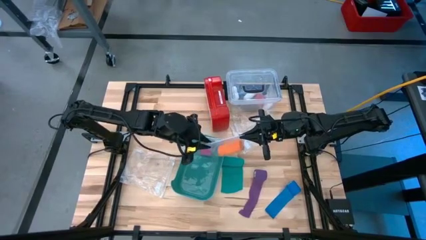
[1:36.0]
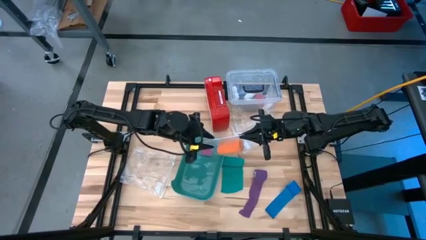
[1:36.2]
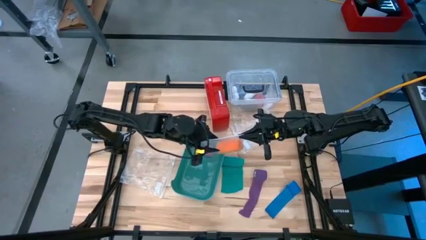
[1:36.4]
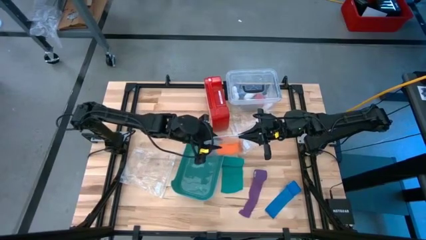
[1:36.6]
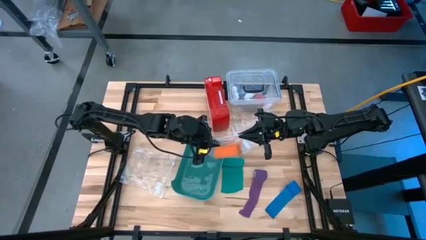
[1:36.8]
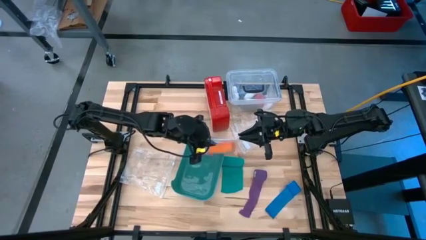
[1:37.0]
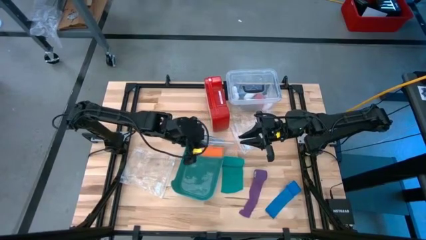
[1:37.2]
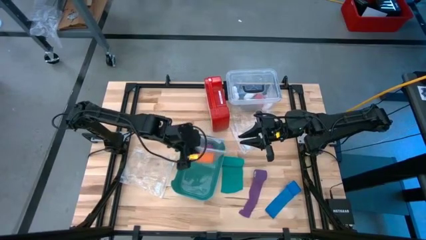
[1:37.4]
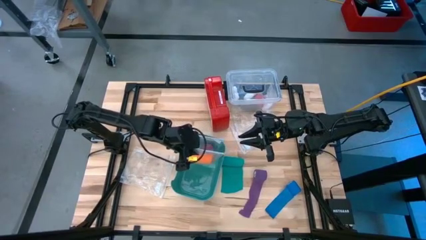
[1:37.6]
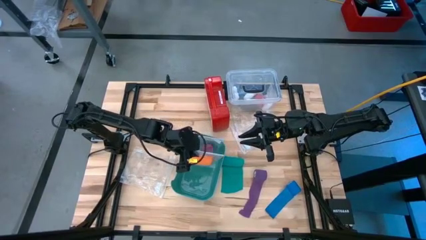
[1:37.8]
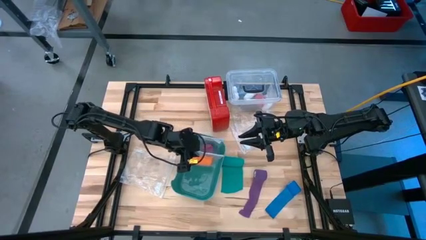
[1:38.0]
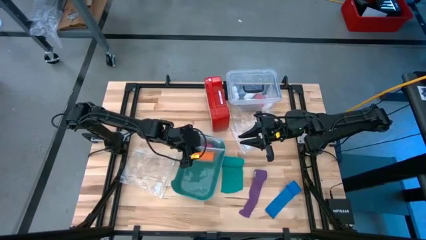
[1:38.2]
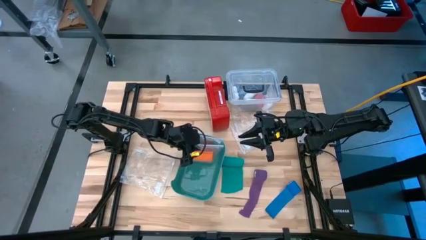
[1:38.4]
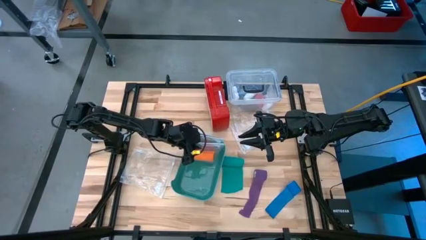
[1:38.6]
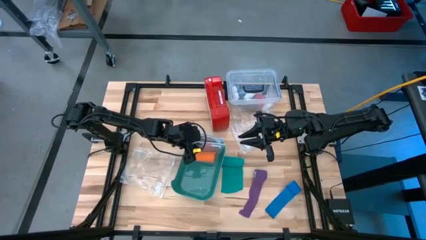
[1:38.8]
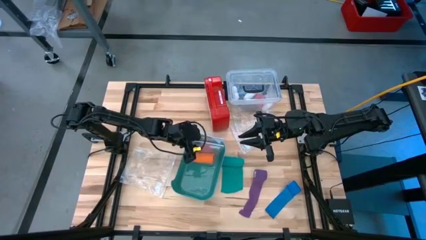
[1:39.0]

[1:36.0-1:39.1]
Task: Roll bandage
Put the transparent zip bag into the green bin

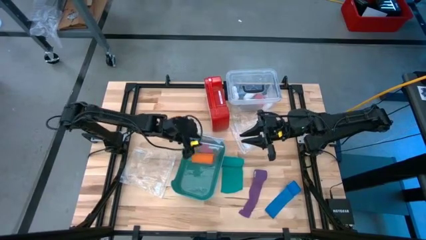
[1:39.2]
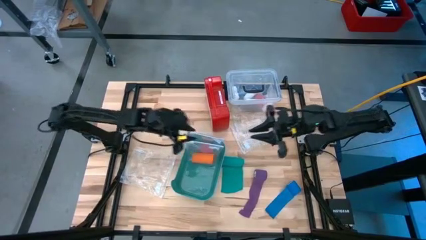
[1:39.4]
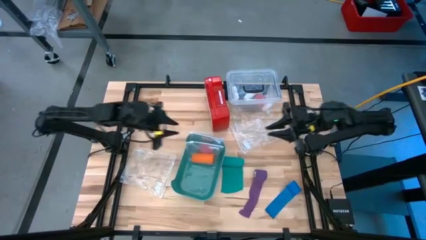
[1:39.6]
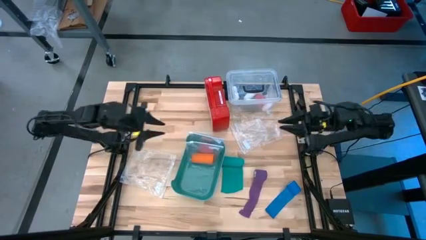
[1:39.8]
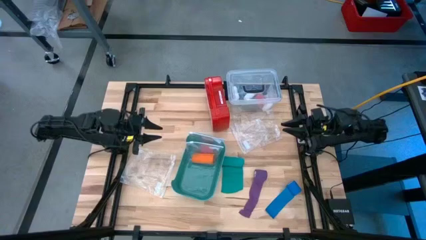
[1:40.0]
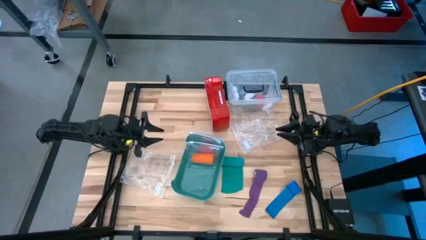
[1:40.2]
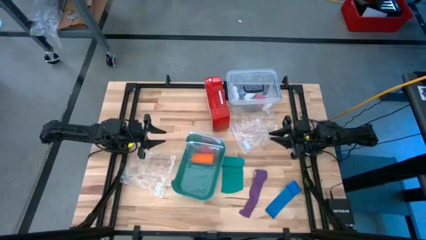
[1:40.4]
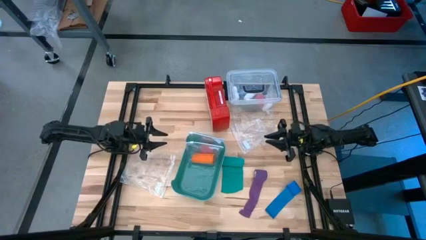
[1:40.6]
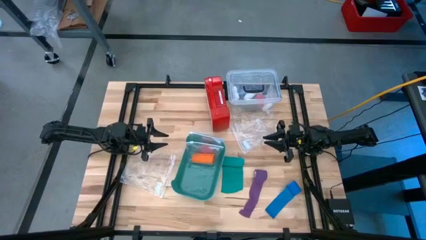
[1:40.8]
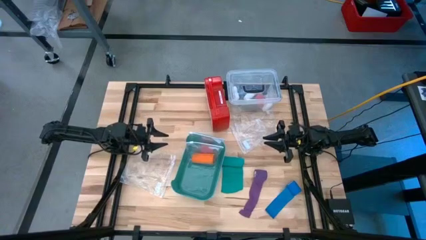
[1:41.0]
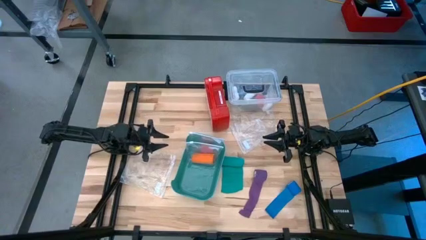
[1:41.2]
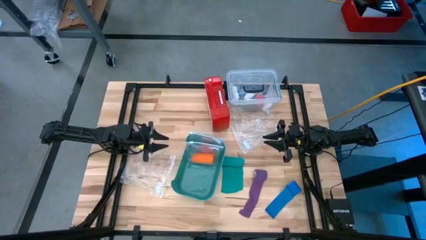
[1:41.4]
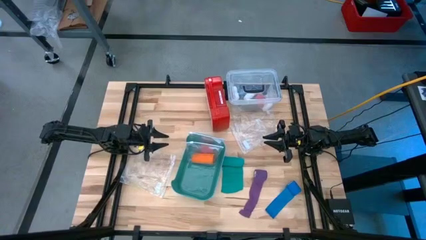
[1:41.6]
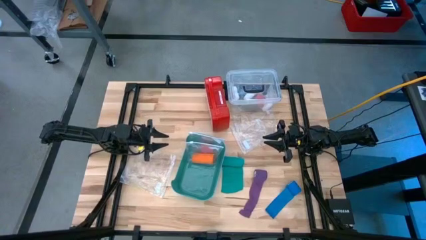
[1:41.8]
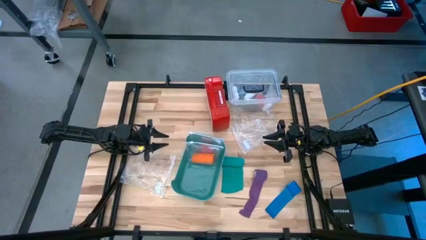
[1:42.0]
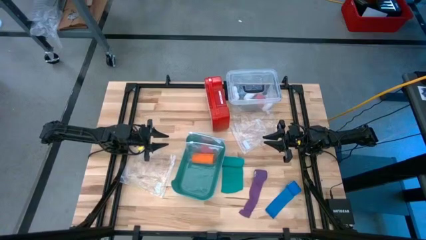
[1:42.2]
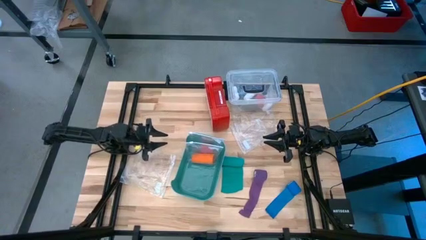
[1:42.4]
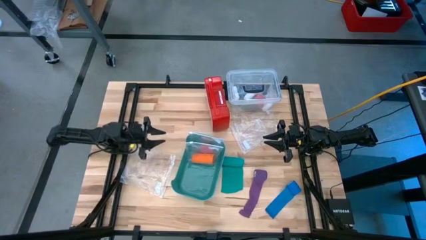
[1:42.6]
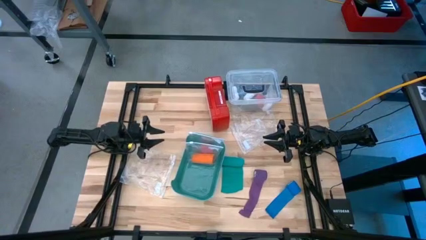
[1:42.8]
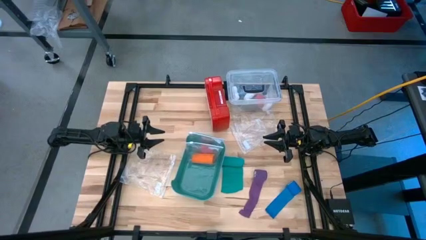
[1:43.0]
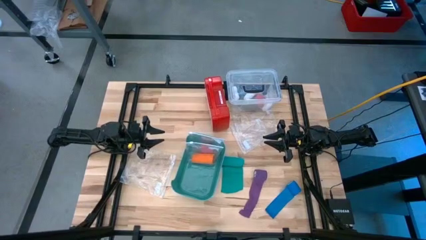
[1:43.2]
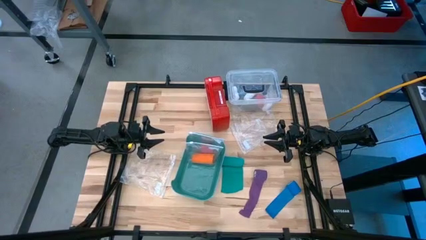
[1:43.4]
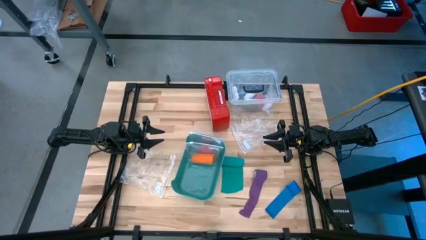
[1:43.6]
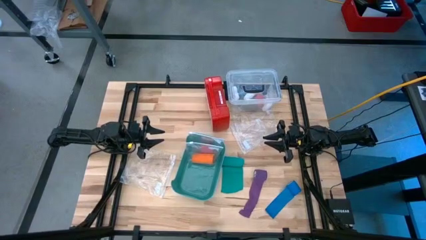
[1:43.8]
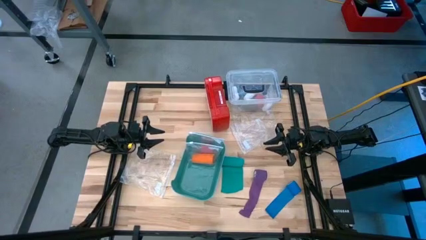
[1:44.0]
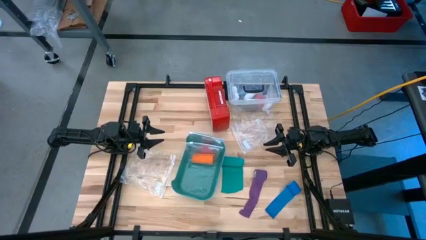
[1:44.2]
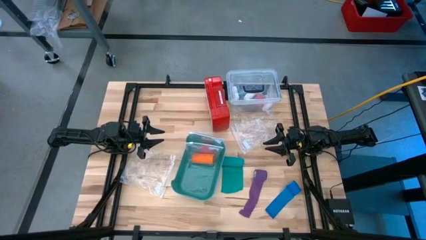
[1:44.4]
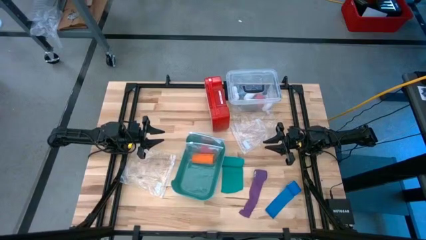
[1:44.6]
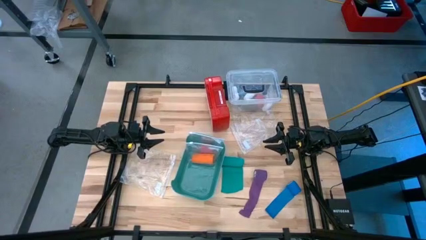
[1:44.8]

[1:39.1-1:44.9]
Return to Home Position

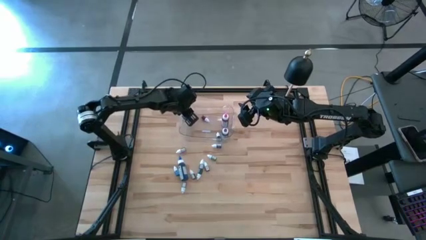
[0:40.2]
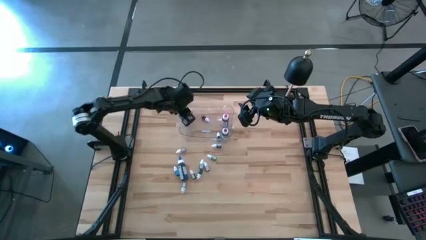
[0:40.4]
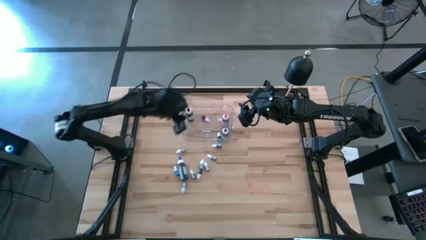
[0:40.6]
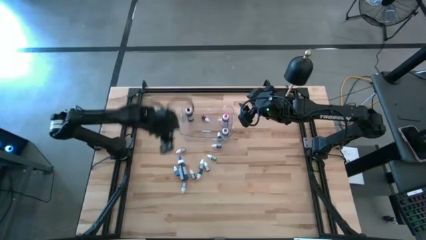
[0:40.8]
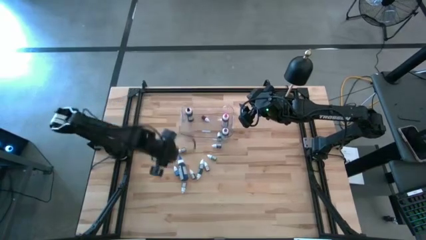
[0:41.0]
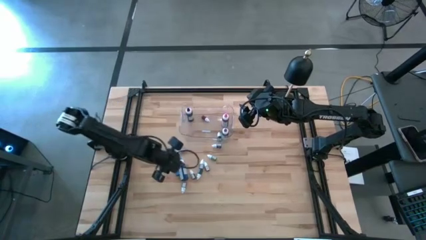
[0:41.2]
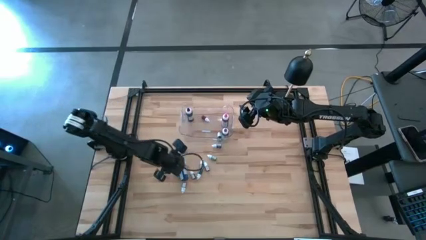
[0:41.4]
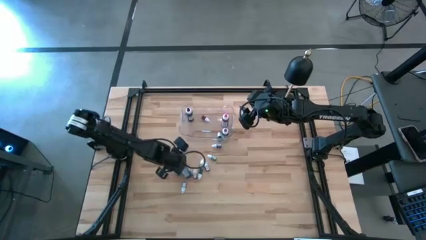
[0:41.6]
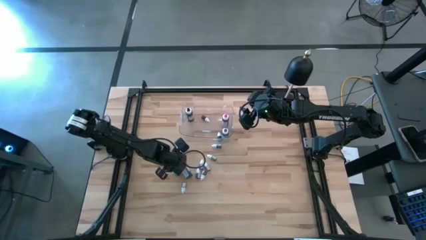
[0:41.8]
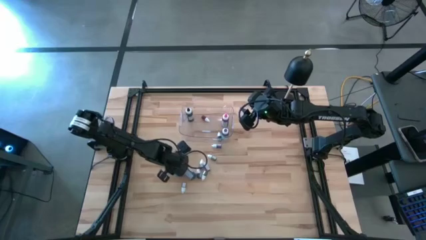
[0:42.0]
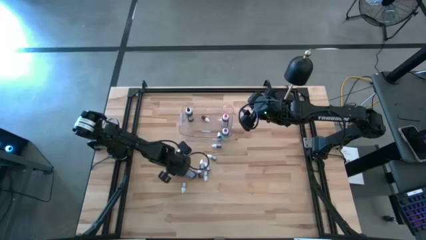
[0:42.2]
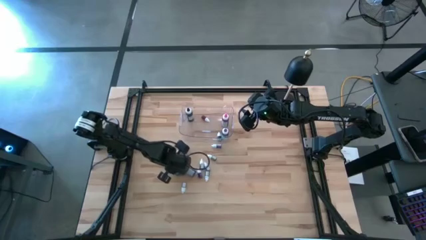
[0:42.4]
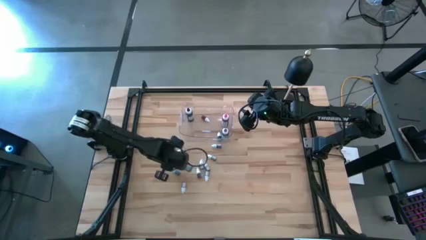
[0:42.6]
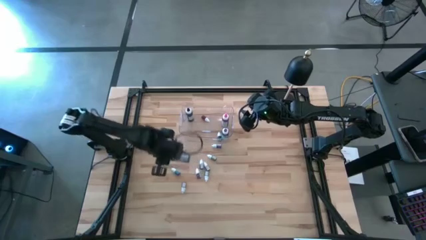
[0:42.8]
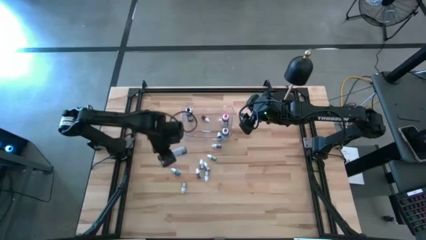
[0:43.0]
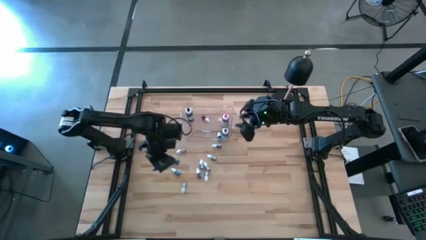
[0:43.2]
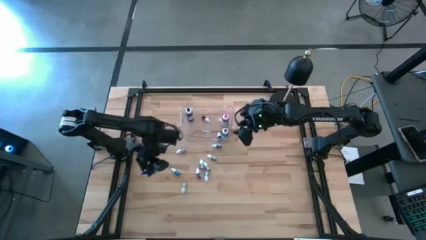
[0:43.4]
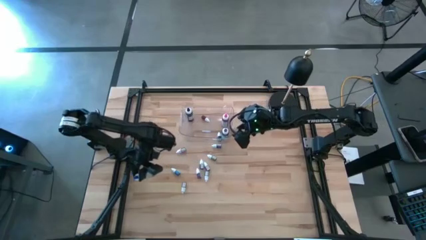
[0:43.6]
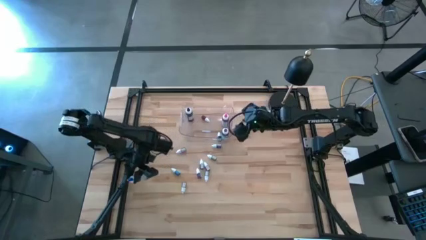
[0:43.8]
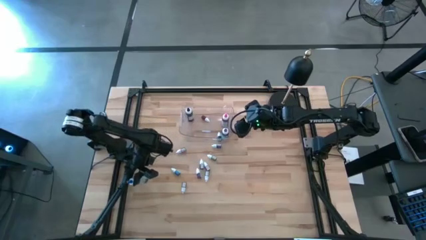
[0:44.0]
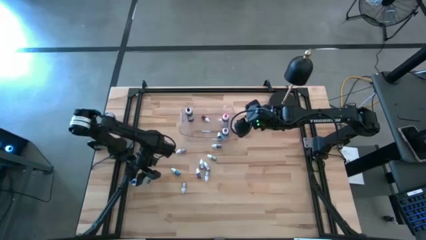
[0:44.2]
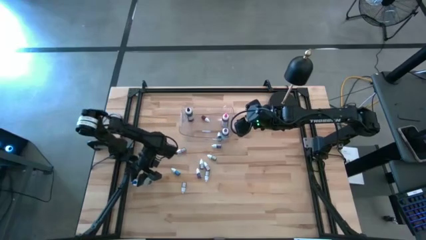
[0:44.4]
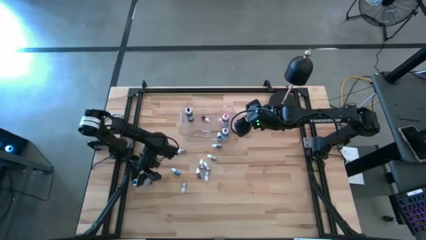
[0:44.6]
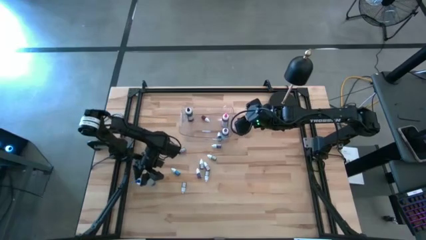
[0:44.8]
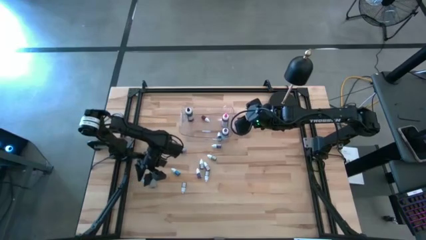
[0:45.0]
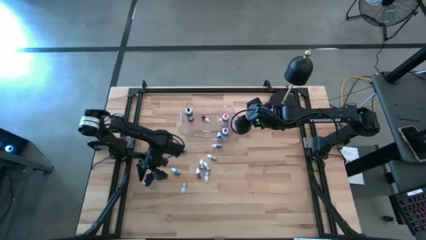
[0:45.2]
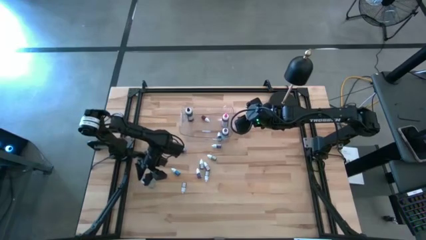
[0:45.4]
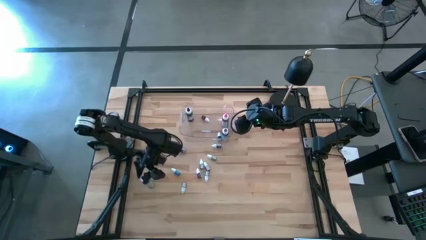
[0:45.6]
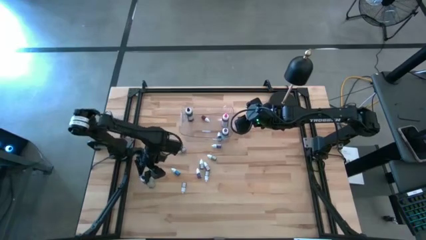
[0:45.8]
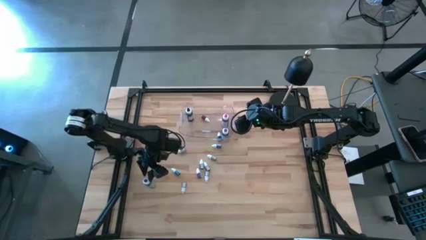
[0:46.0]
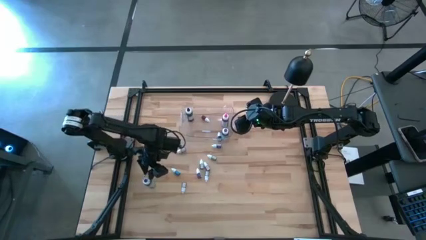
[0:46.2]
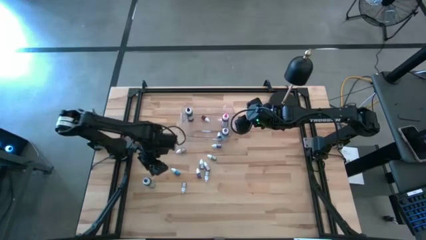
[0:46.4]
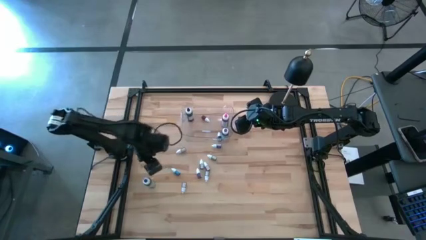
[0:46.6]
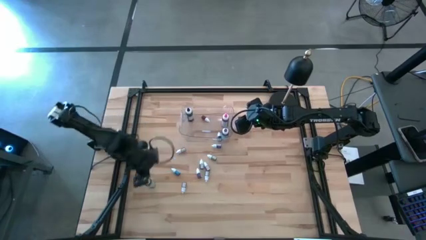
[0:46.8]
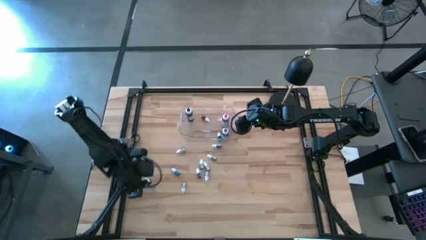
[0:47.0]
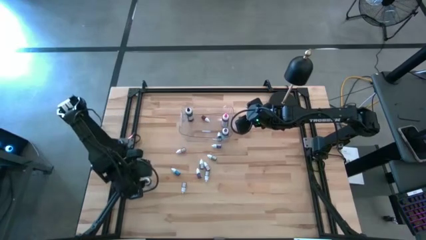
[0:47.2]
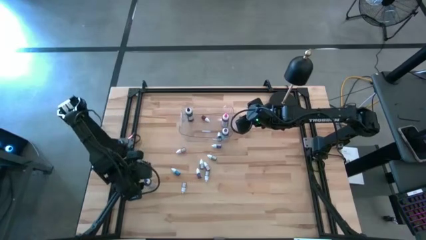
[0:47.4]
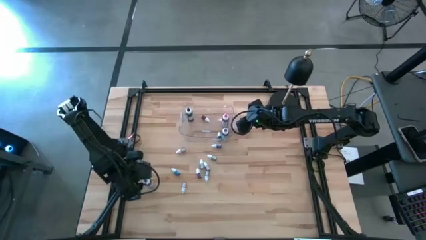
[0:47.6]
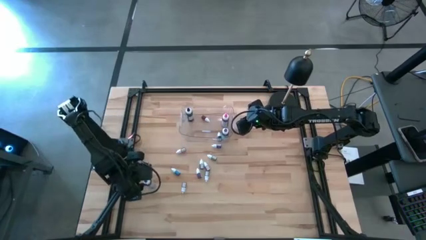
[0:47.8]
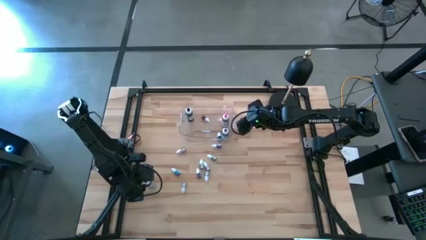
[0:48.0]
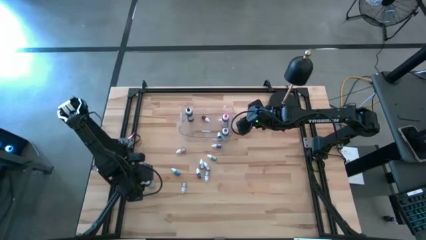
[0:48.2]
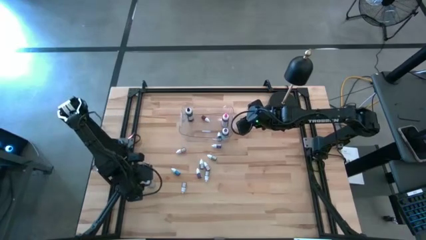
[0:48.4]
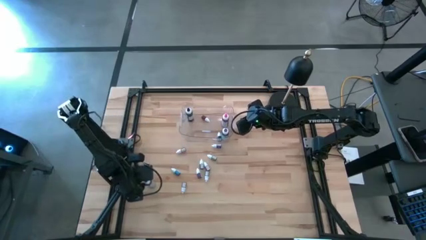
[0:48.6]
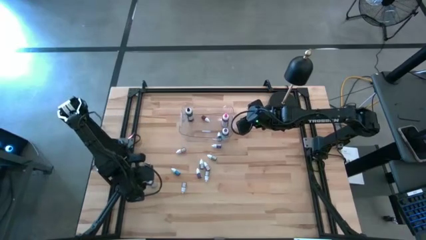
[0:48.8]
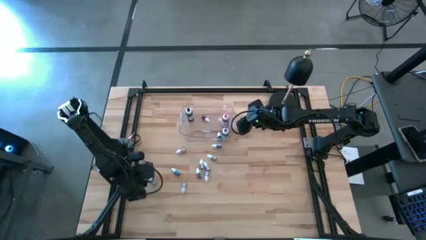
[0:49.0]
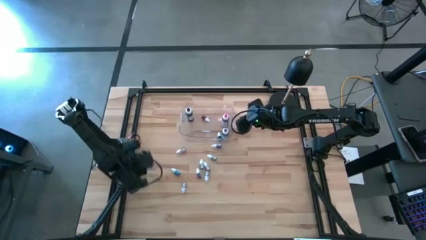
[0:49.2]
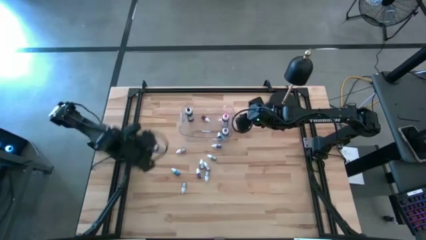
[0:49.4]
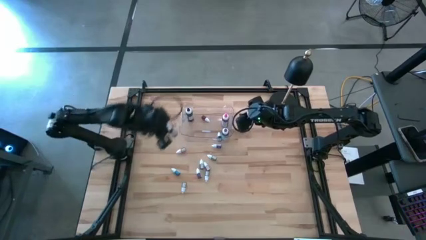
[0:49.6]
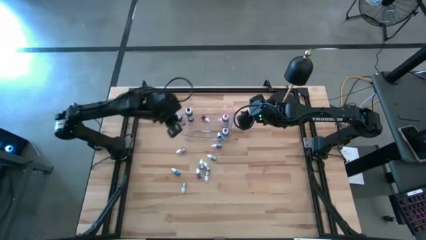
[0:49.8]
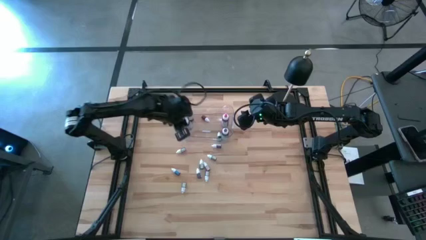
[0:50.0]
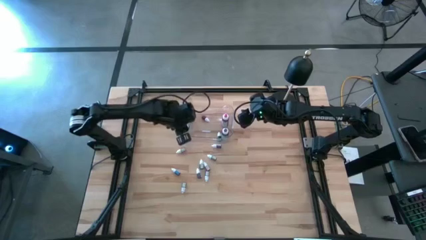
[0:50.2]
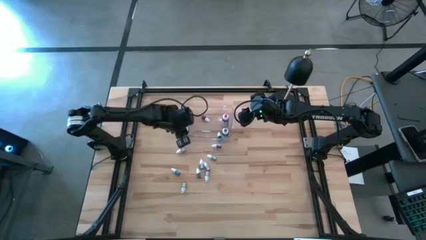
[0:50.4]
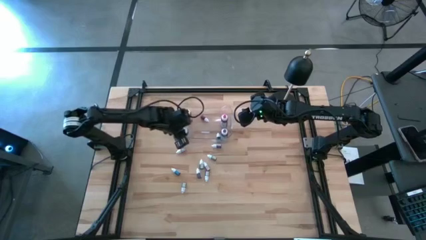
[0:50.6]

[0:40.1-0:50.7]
Task: Pick & Place food coloring
Put the large blue food coloring bottle into the transparent bin
